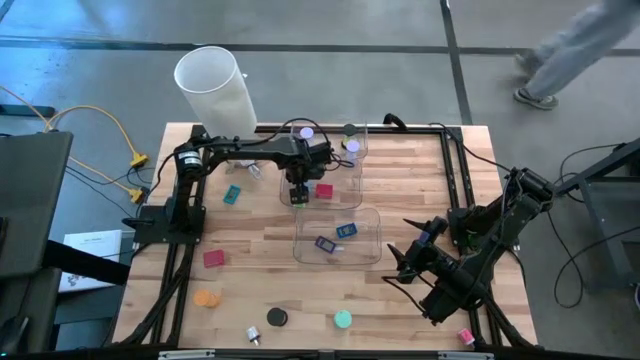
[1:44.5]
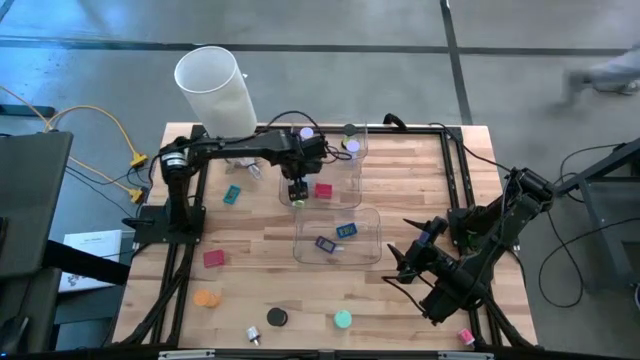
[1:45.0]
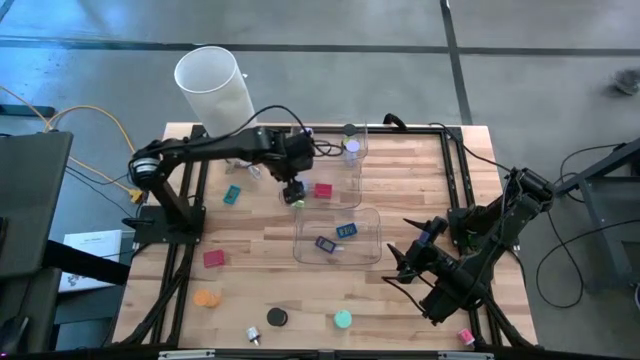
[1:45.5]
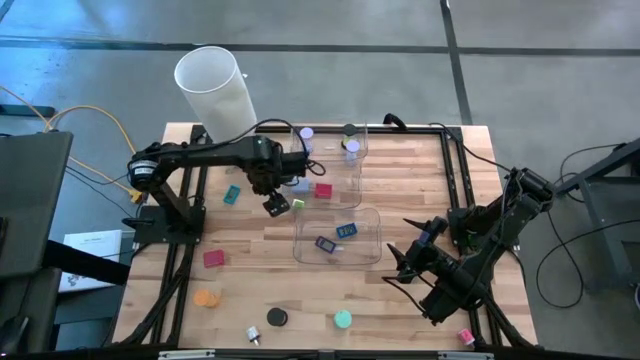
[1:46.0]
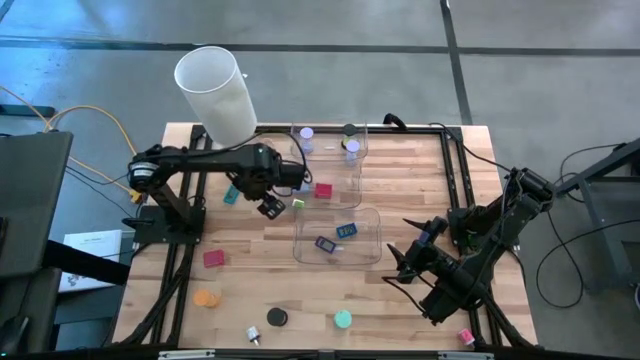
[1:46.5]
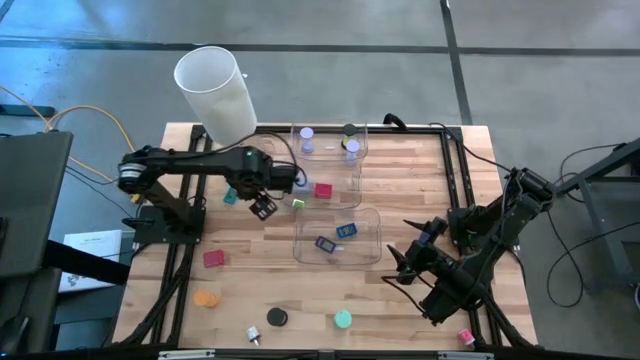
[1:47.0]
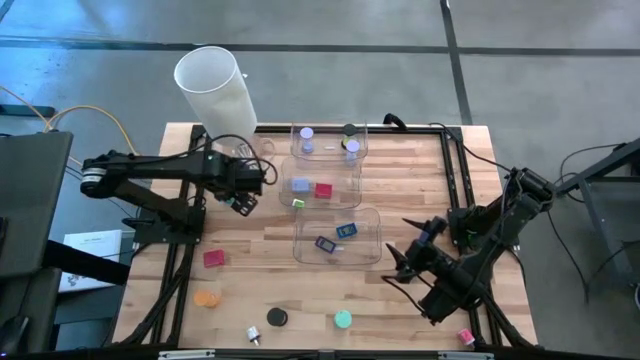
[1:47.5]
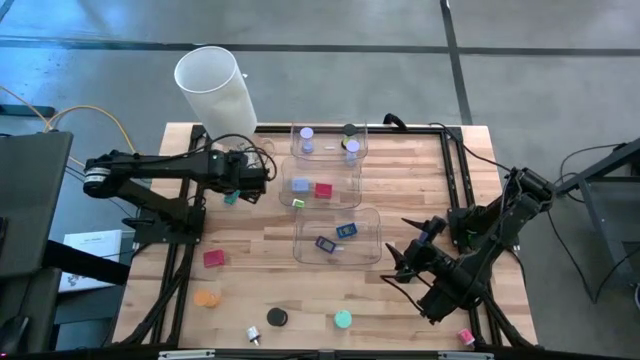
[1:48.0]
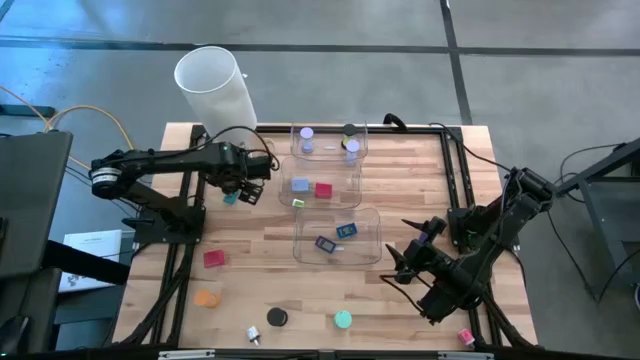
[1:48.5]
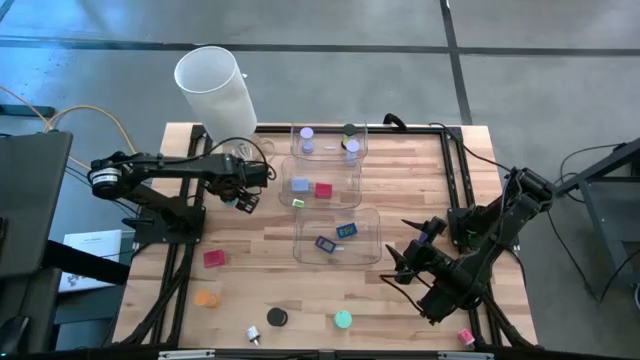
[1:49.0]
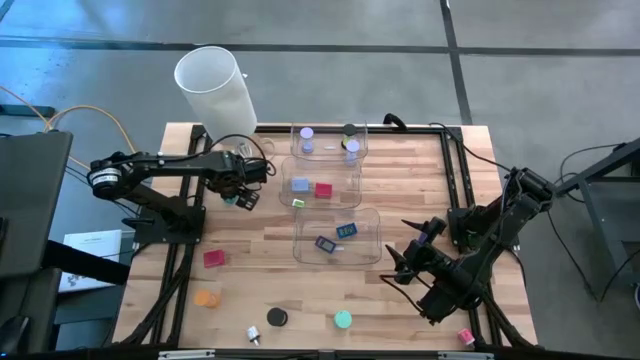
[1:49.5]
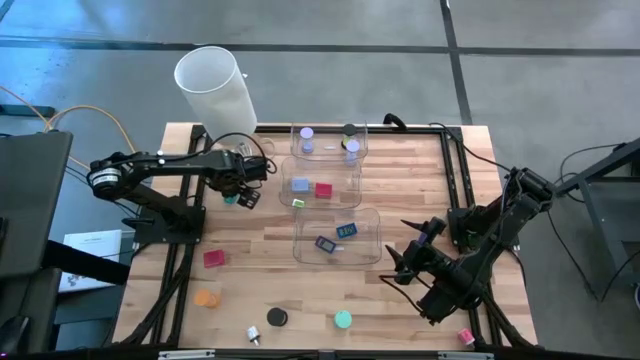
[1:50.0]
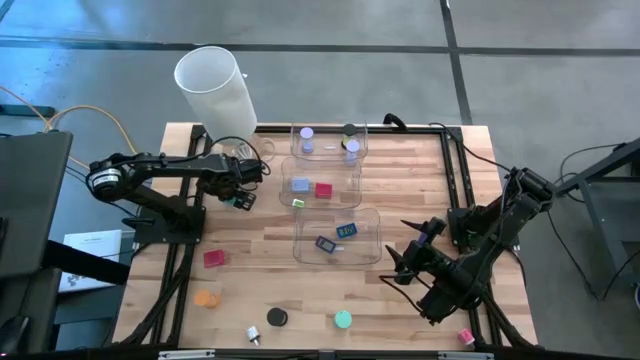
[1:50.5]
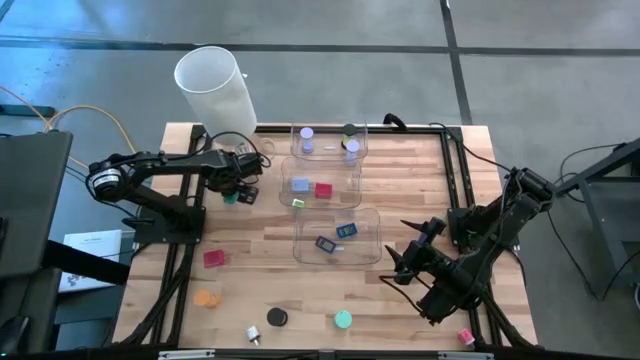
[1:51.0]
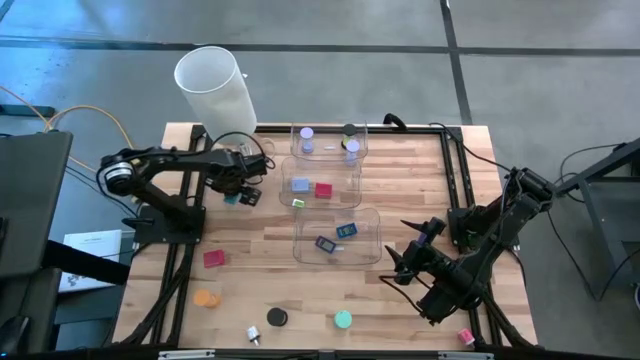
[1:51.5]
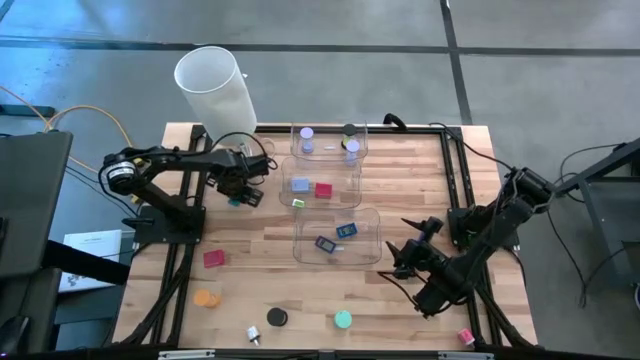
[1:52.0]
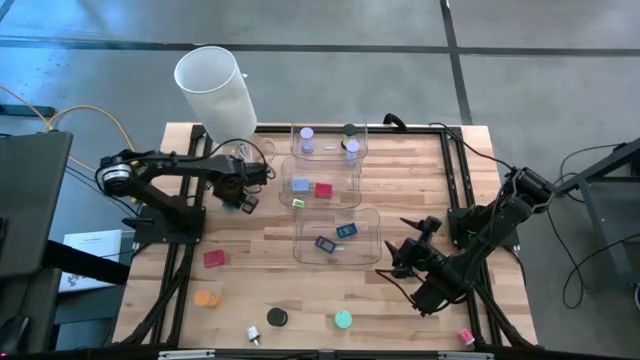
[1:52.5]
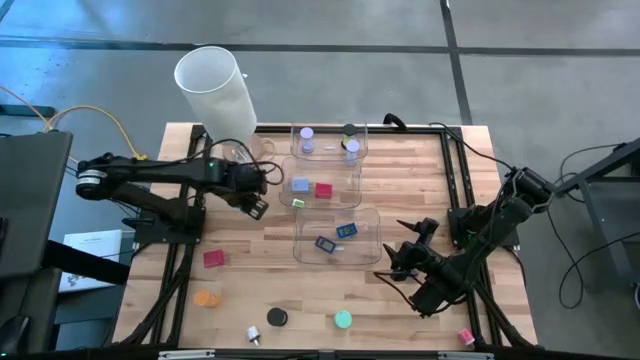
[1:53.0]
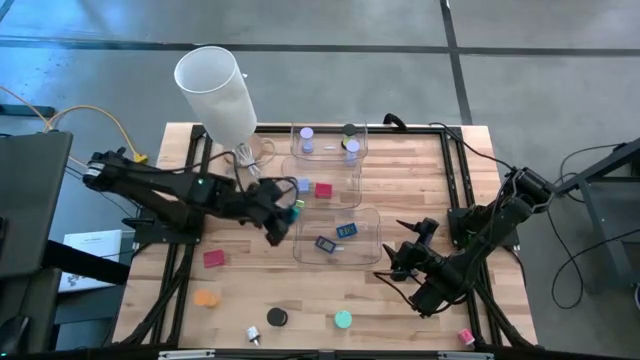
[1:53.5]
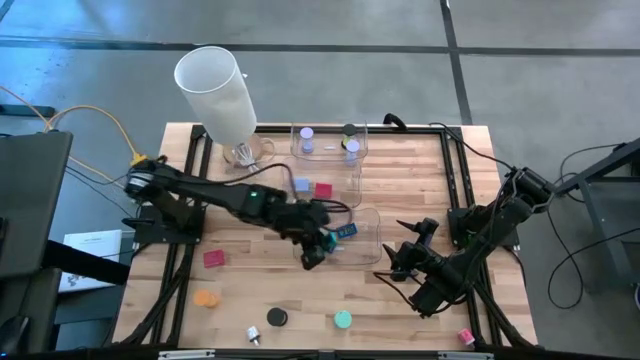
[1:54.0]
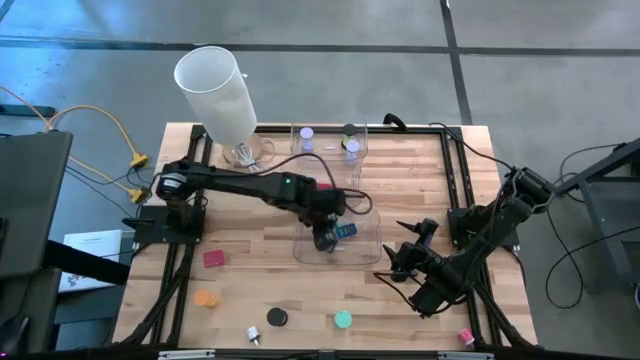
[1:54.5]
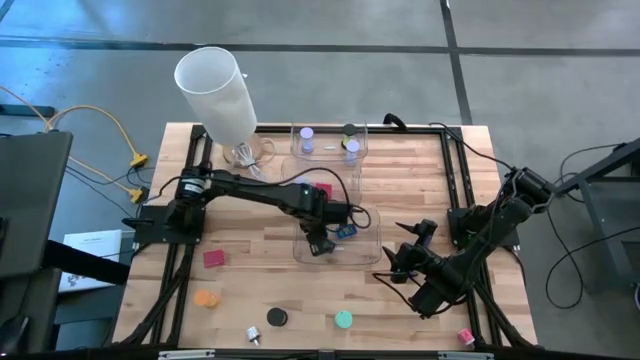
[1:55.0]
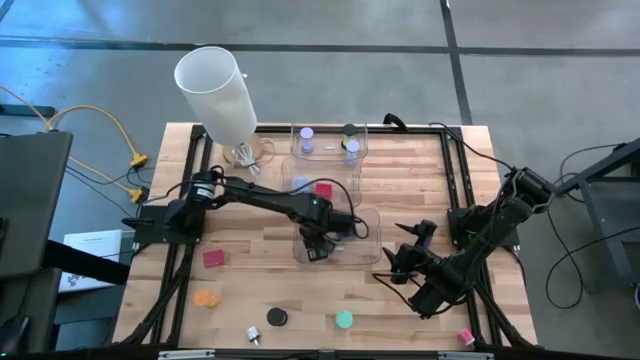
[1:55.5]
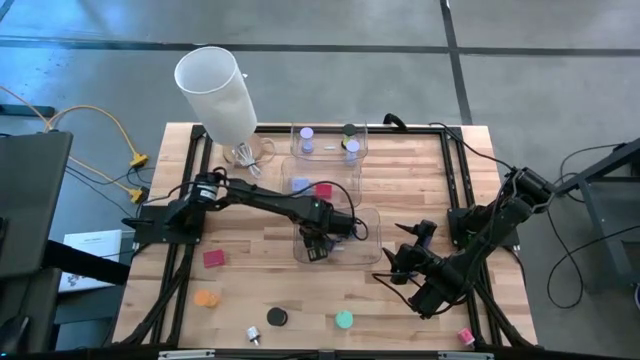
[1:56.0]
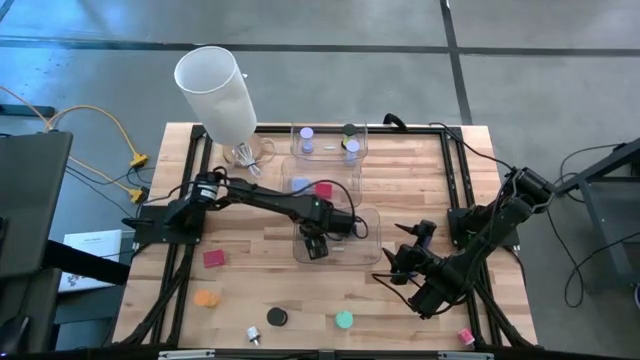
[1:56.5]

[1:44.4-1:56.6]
Task: Pick & Place Office items
Put the light blue digital timer into the bottom transparent bin

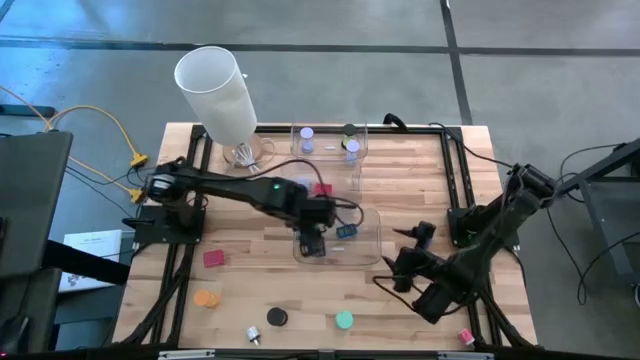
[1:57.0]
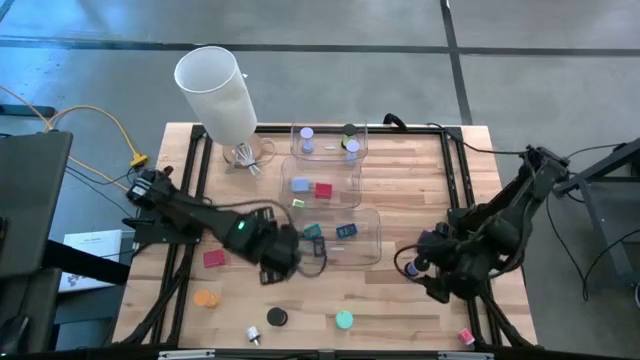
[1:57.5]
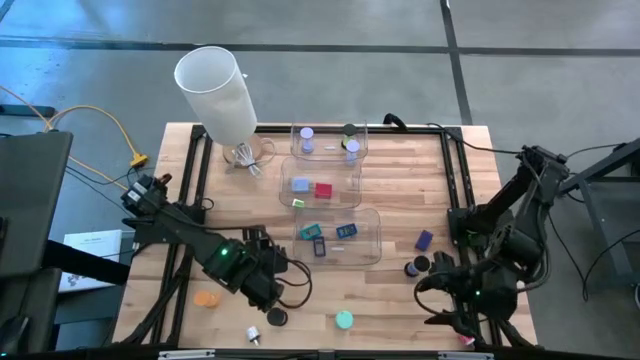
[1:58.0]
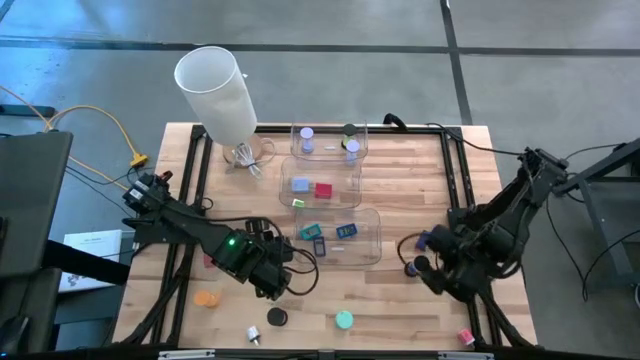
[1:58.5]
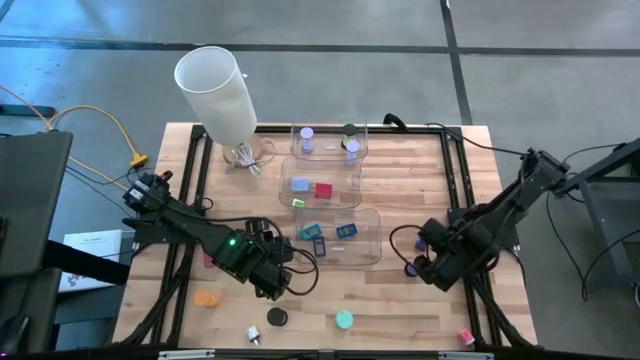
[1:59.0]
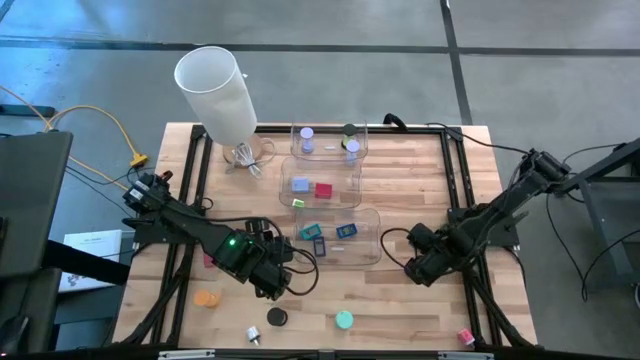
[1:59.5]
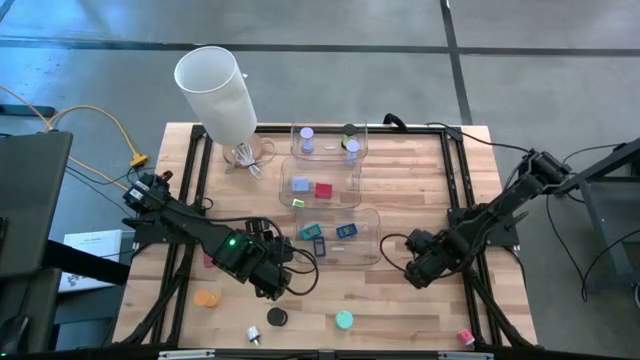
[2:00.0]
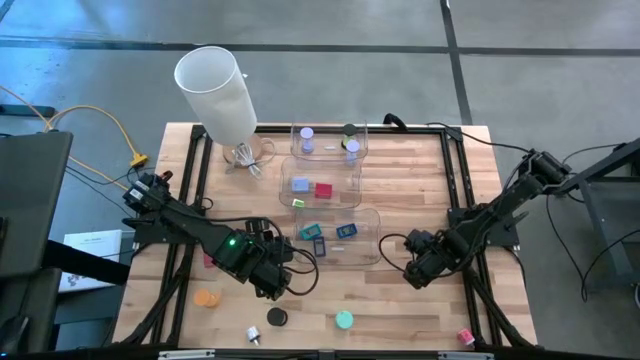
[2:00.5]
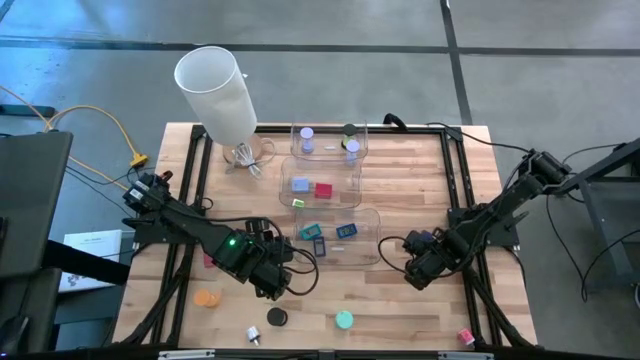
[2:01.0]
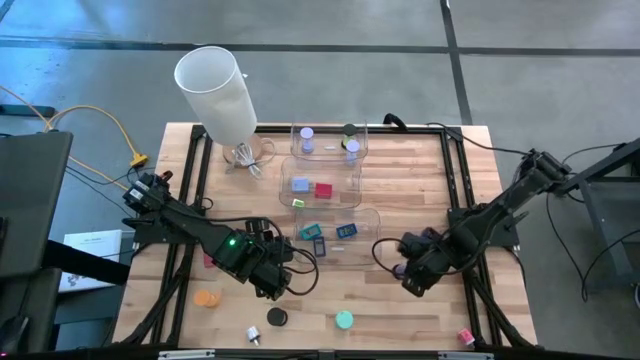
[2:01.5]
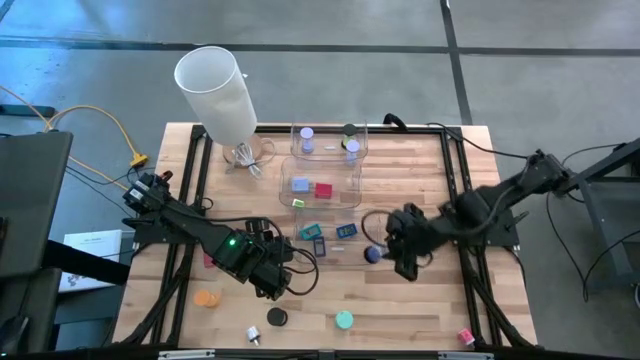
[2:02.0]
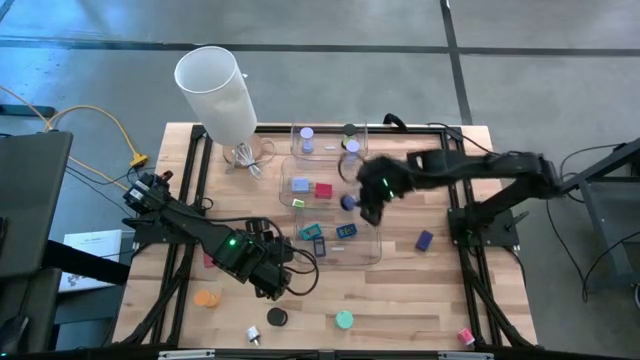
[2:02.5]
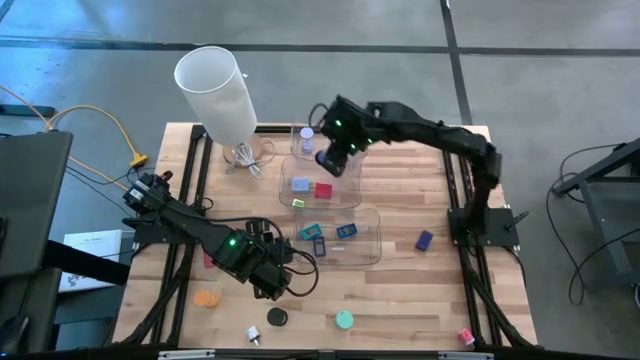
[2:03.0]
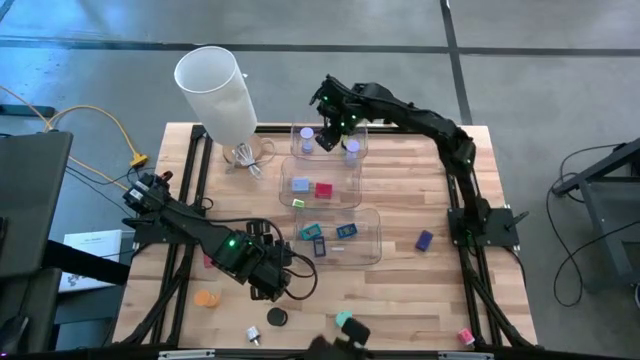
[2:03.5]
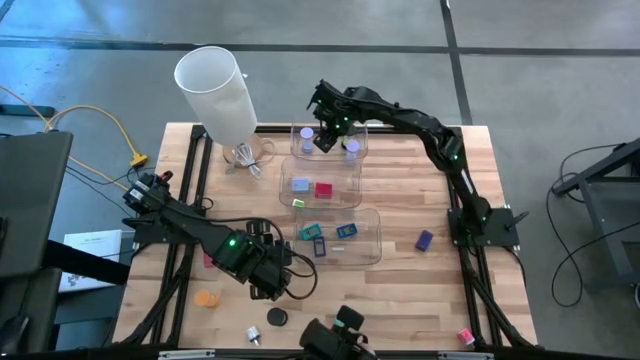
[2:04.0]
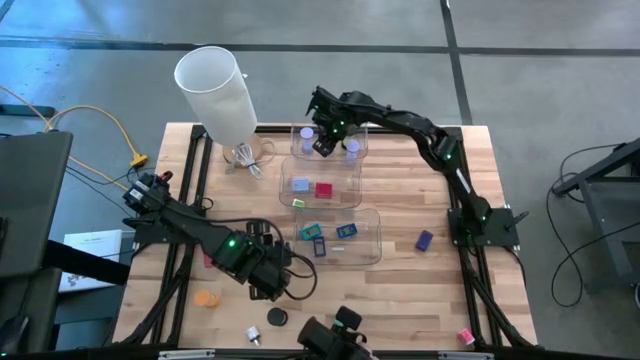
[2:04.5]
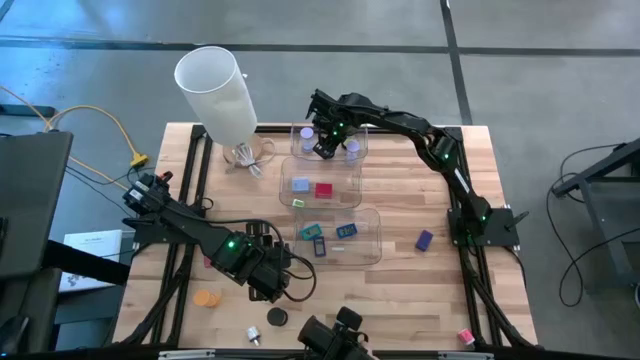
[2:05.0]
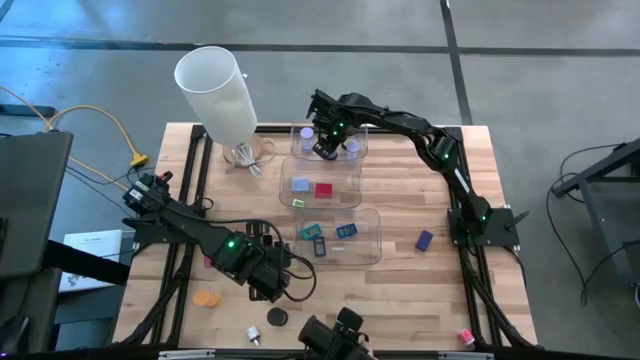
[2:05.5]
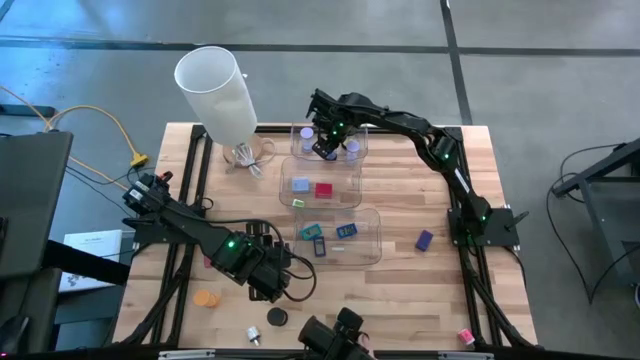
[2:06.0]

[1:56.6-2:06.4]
Put the blue hourglass in the top transparent bin
